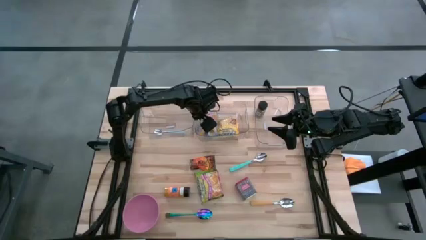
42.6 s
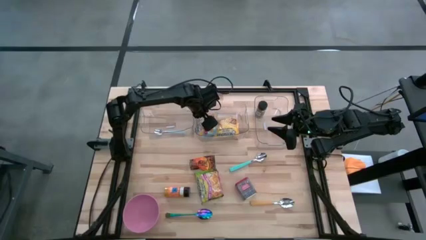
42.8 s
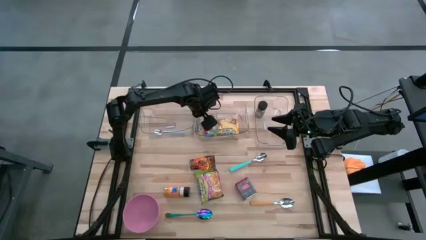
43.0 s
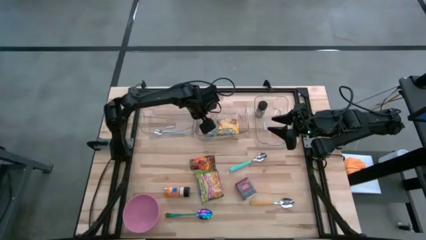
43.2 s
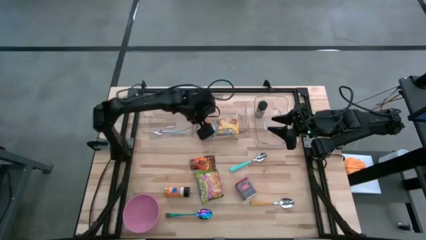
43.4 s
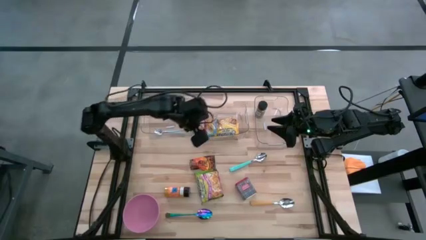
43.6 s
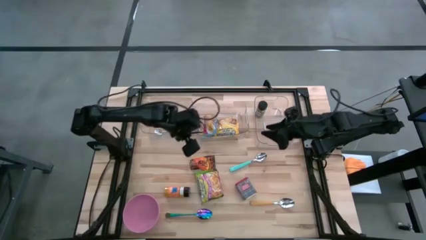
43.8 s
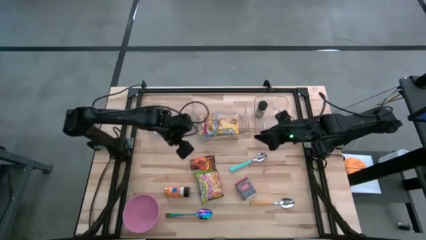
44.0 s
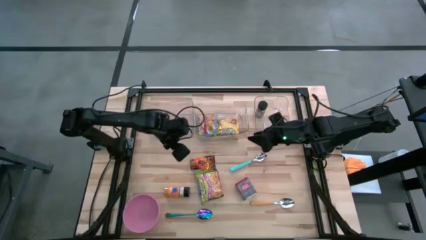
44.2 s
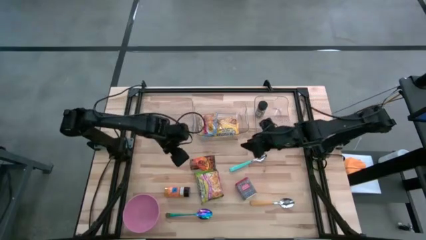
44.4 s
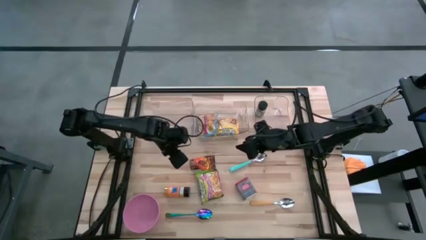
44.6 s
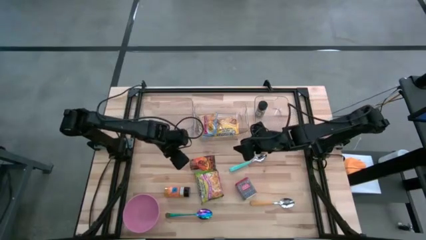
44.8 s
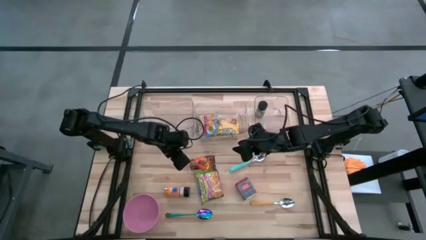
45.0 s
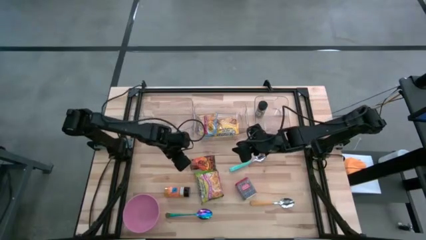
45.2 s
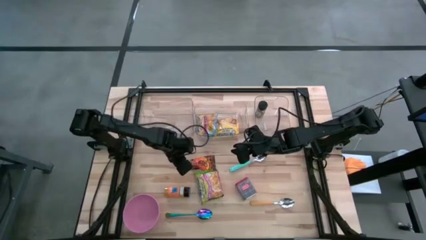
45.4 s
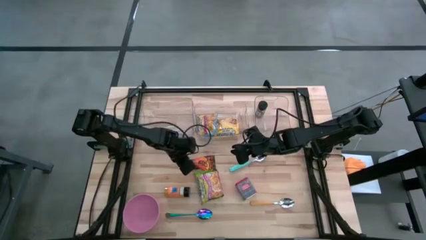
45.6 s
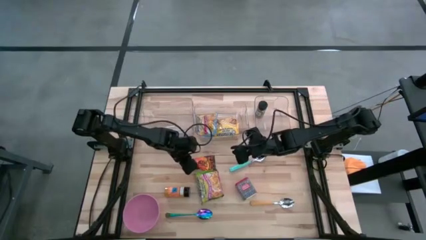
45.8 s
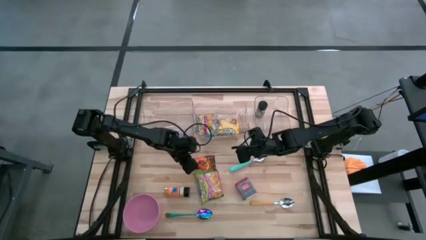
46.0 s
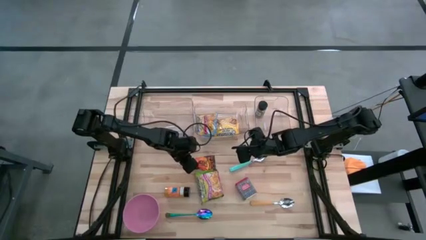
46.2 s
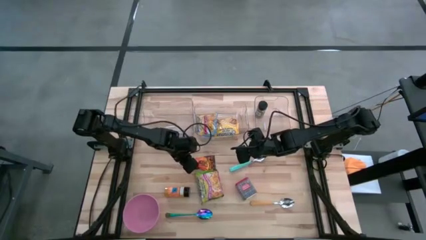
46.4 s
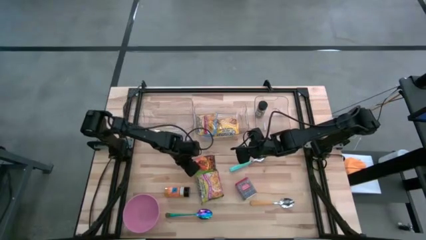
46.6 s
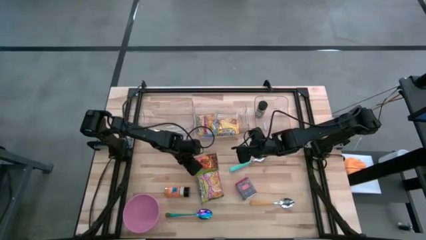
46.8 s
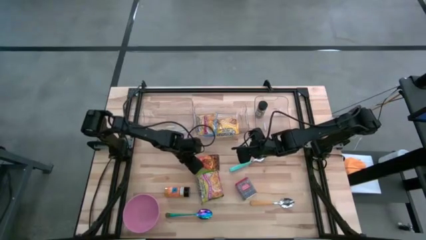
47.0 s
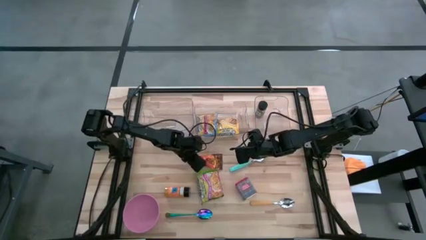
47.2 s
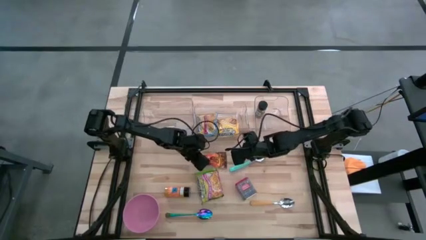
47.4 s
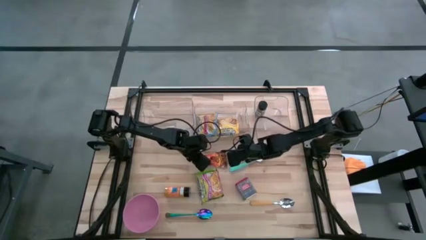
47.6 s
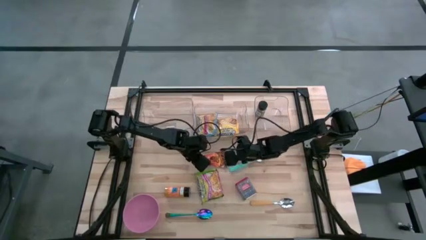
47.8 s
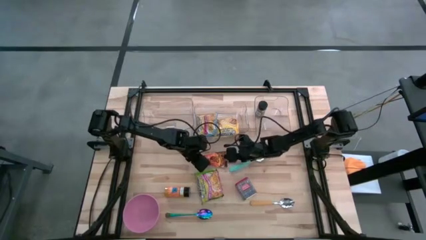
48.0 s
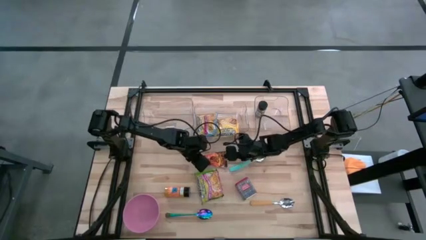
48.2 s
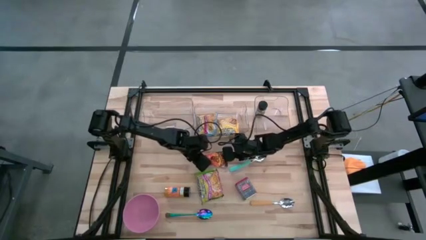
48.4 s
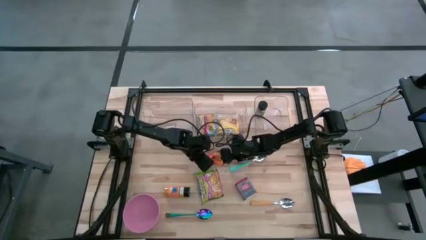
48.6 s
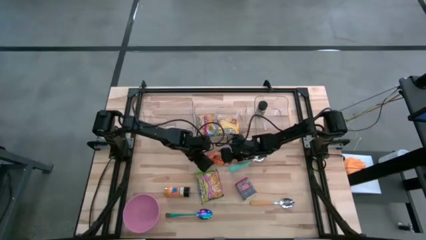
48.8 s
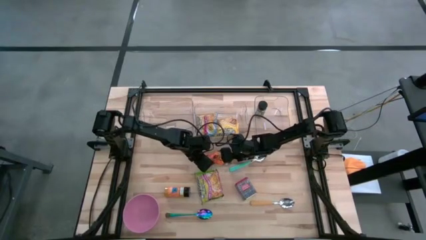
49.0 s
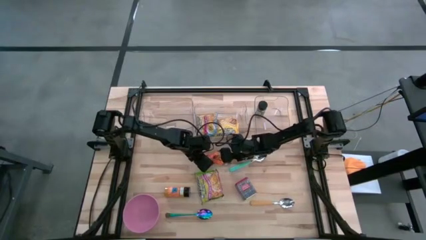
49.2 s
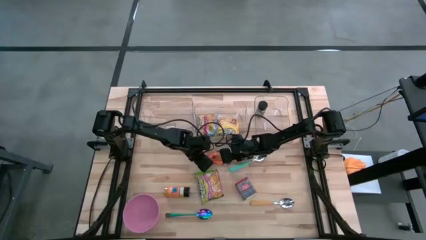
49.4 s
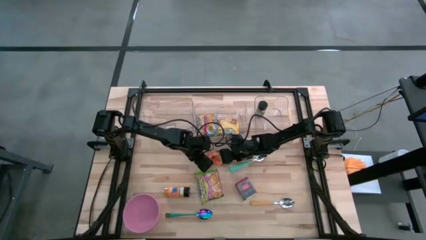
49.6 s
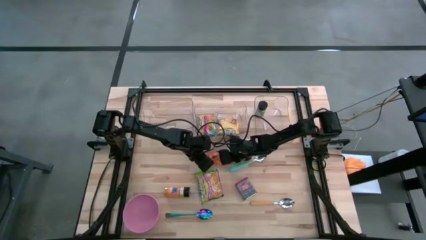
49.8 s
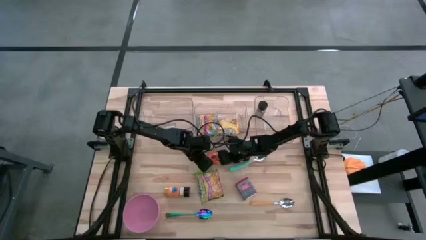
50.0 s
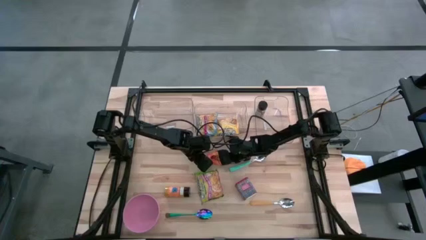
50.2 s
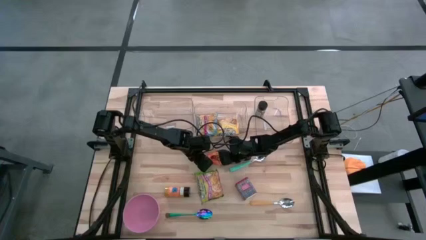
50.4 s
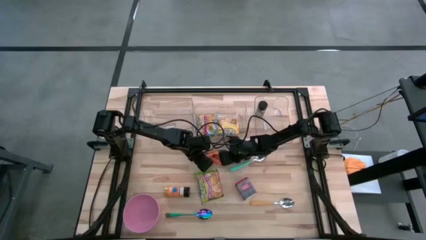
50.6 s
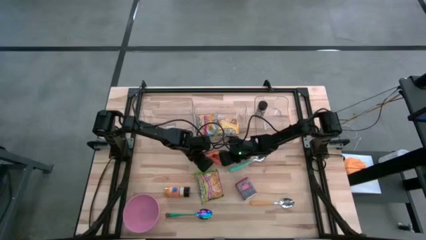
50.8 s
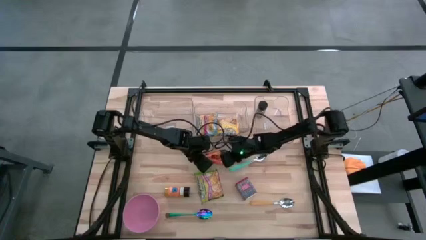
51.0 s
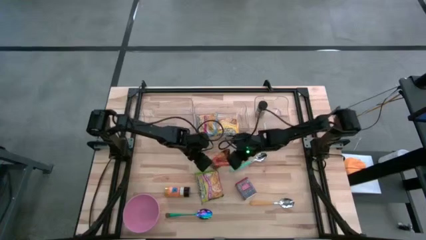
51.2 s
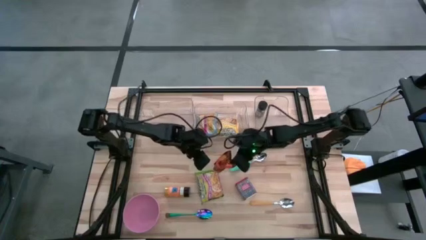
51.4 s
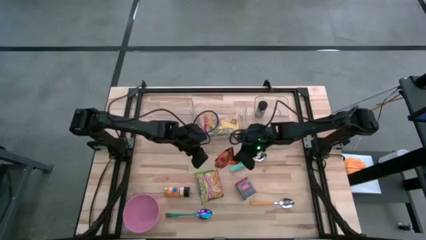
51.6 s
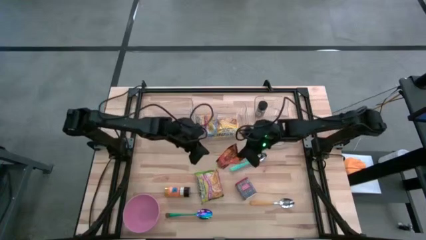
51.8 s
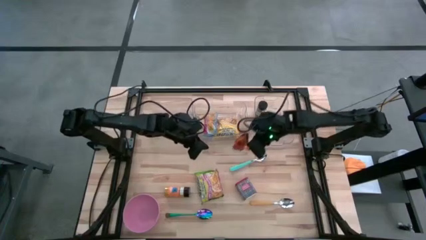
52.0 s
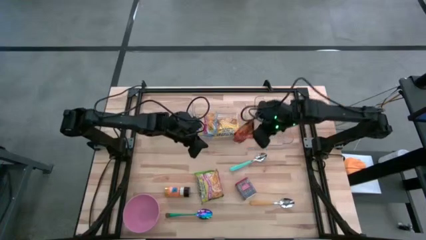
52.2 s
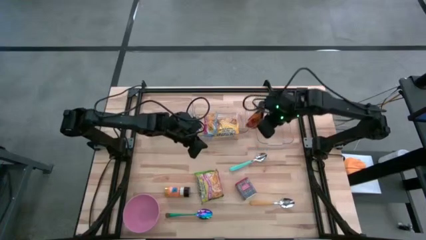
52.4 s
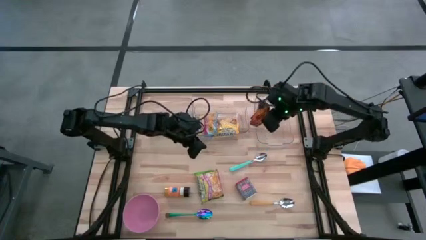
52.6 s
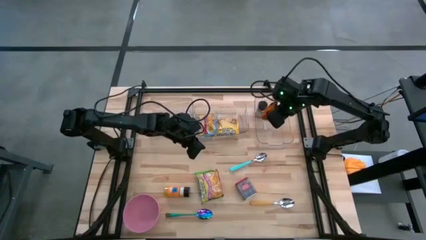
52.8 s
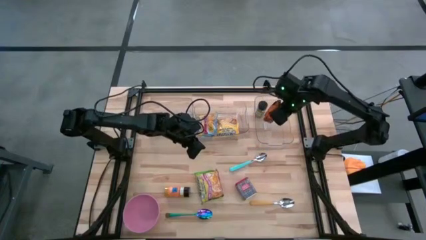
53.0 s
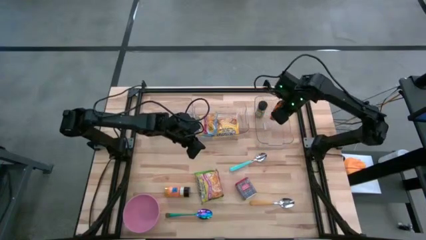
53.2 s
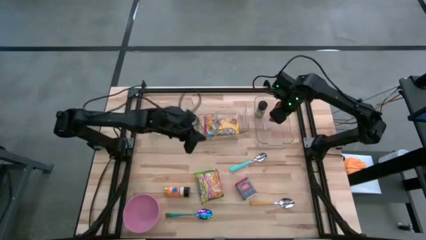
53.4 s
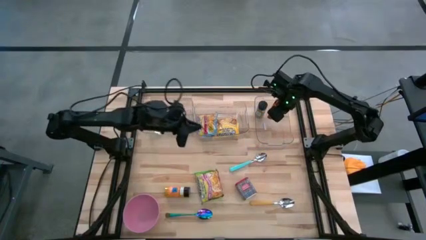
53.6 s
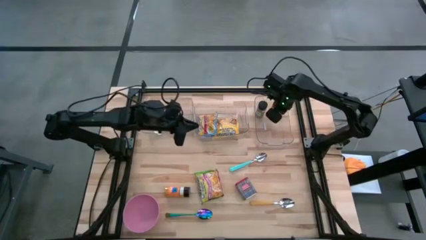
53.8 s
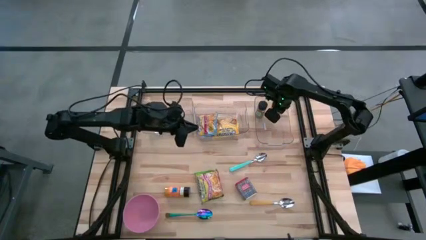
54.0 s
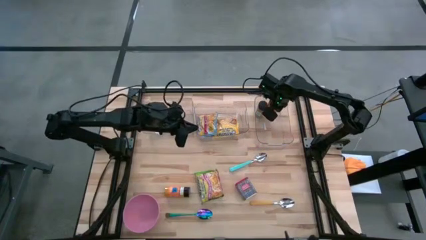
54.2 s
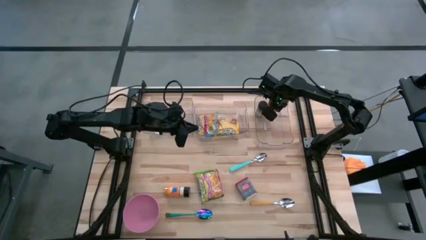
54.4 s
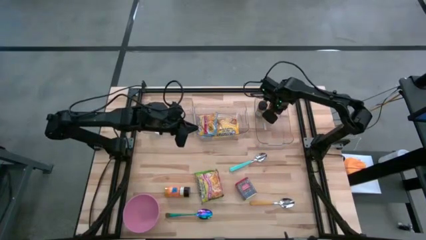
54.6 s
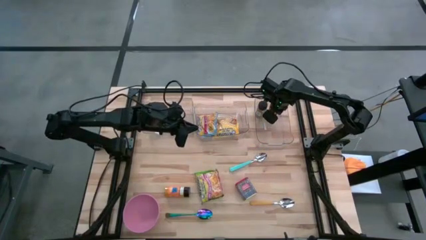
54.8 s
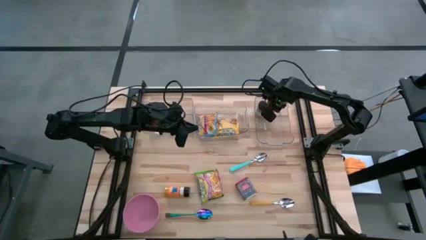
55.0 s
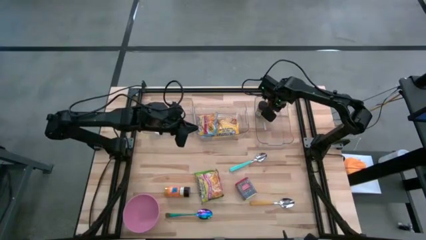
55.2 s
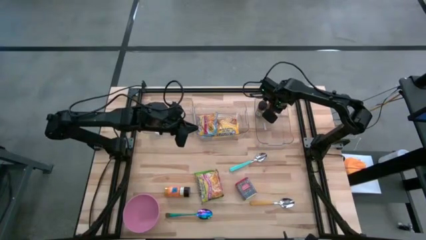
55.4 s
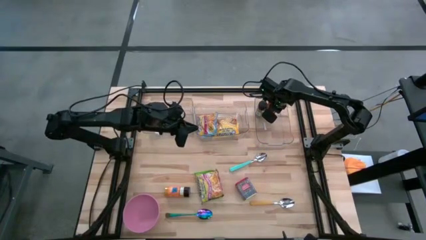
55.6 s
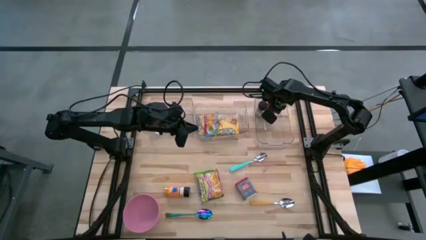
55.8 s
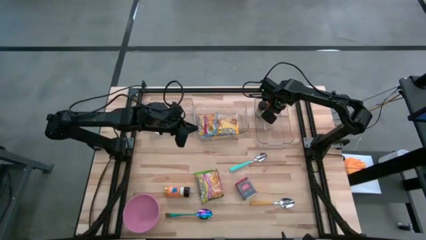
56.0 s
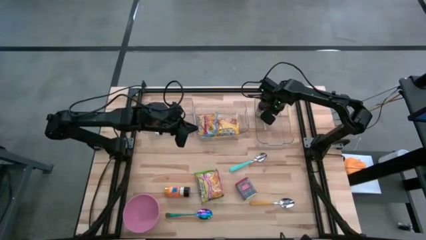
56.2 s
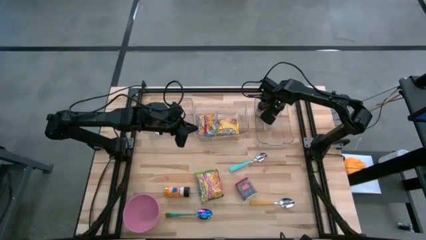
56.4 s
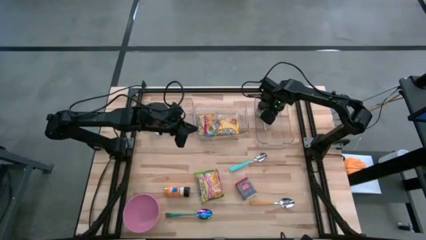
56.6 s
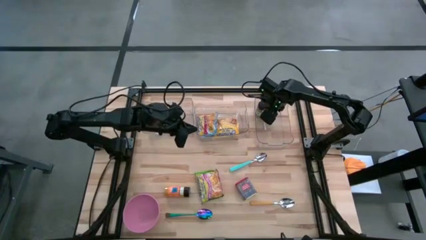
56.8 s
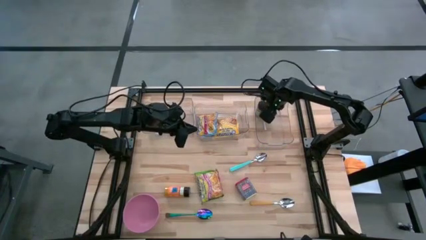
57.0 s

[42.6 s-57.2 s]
Put the orange seasoning bag into the right transparent bin
